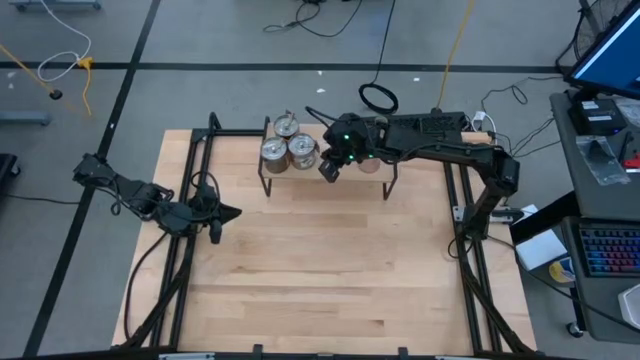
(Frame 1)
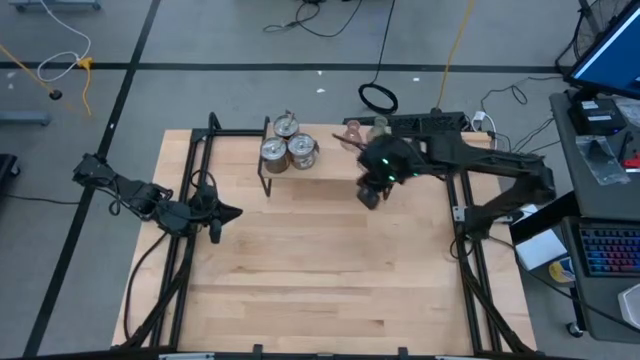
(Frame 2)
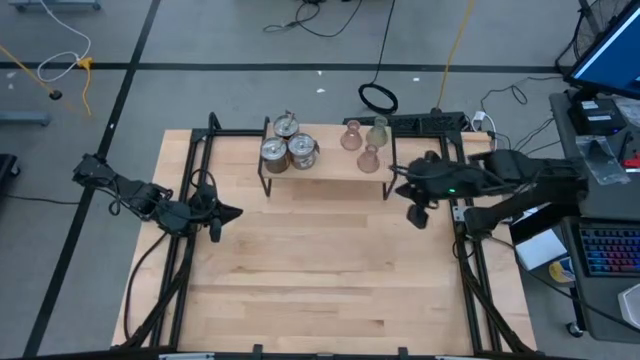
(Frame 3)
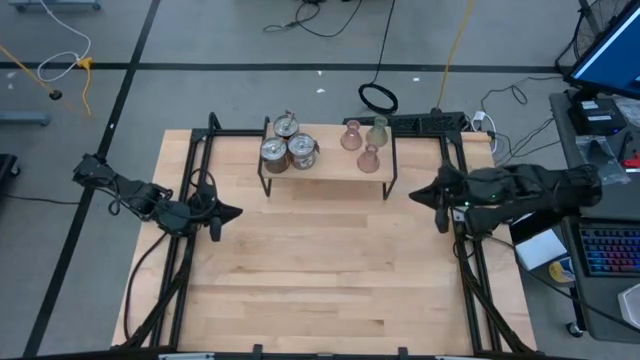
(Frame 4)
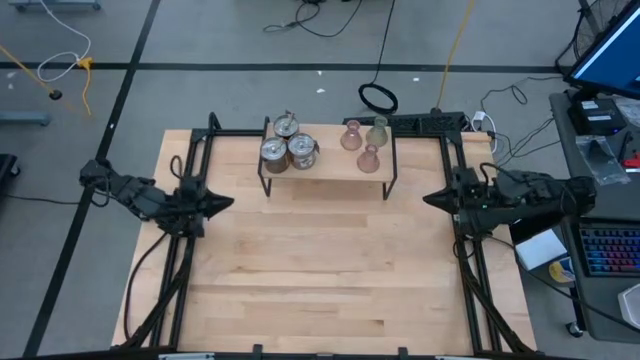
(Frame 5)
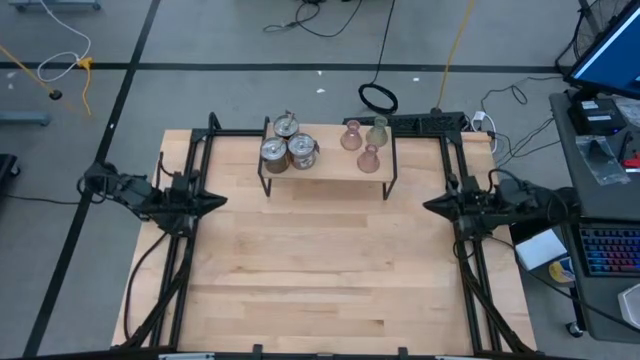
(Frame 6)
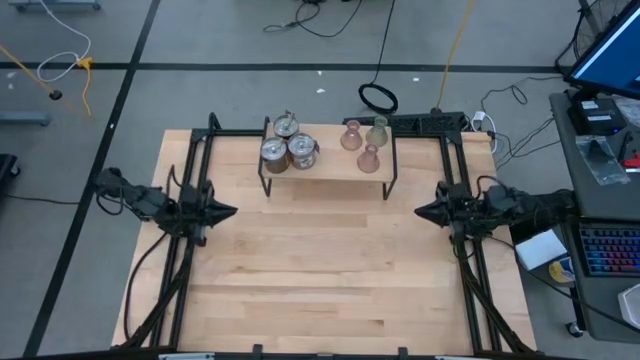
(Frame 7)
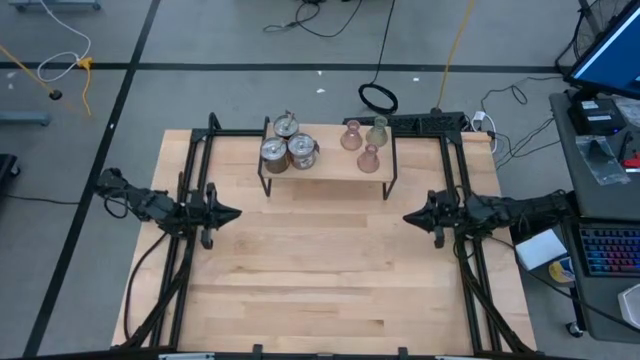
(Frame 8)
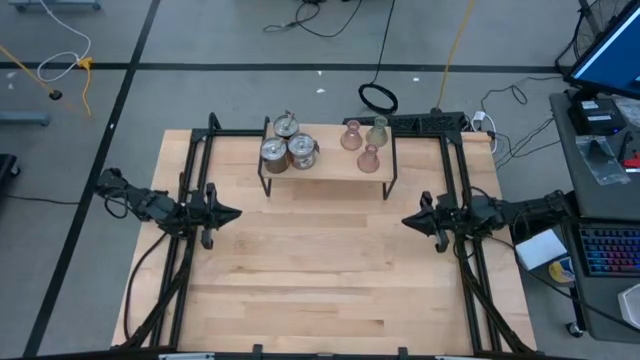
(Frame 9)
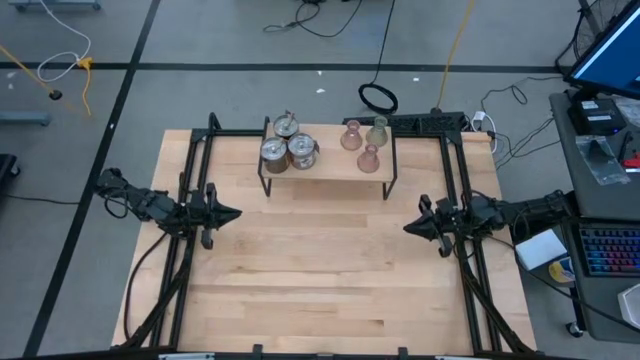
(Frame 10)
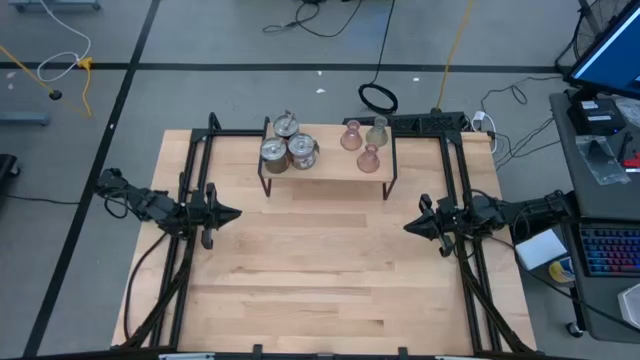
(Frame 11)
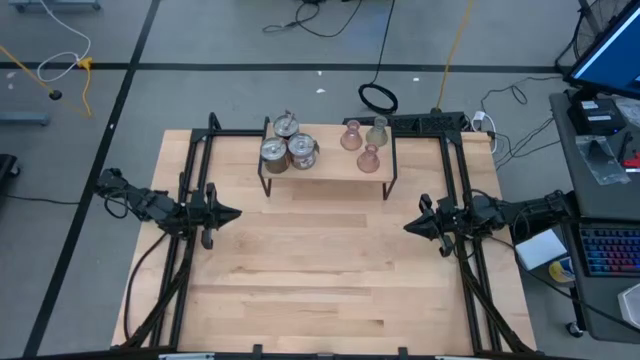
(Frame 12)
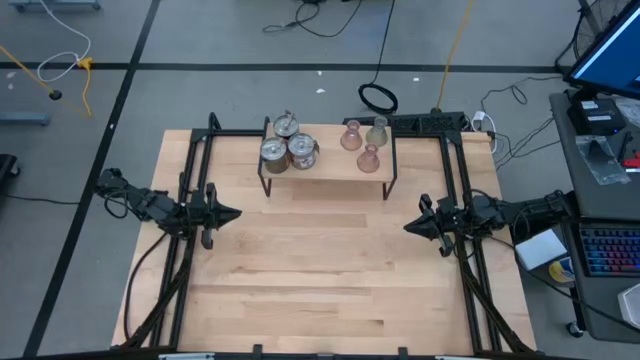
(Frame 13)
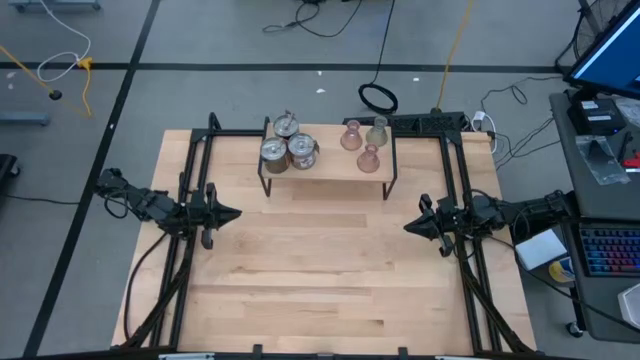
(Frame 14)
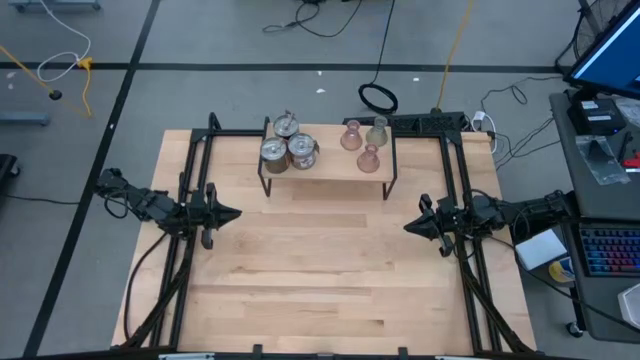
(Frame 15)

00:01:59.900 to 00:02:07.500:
Task: Pick & Place candle stick holders
Return to Home Position

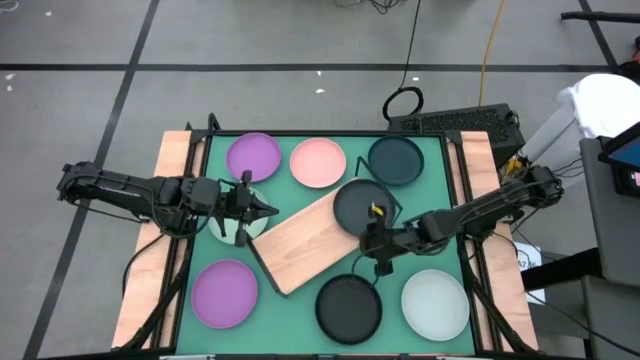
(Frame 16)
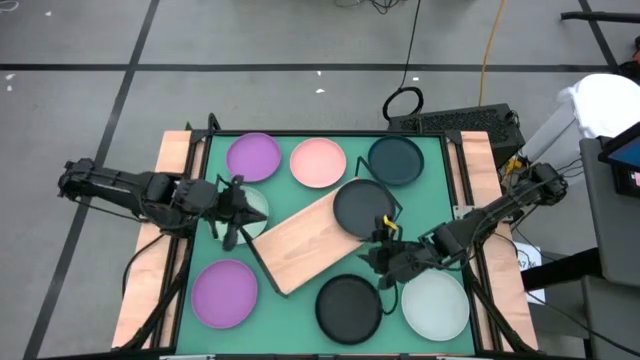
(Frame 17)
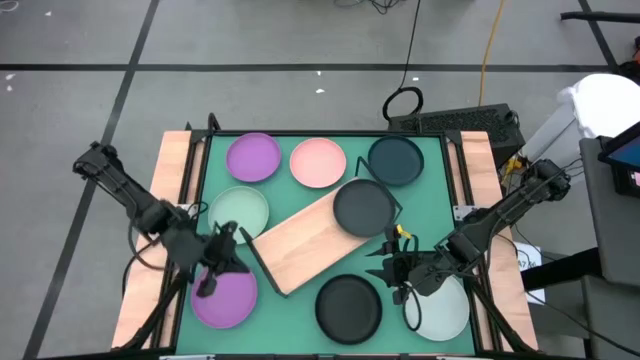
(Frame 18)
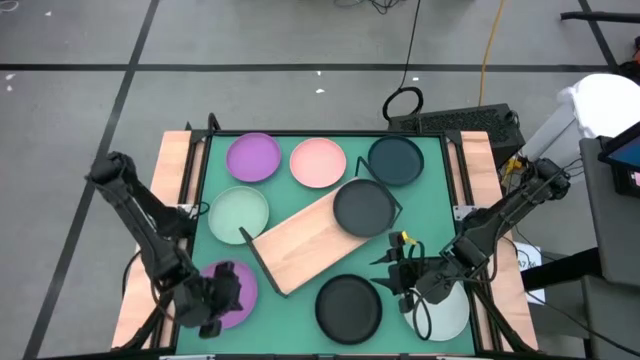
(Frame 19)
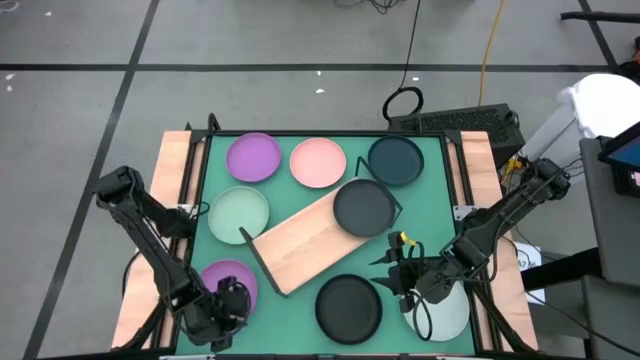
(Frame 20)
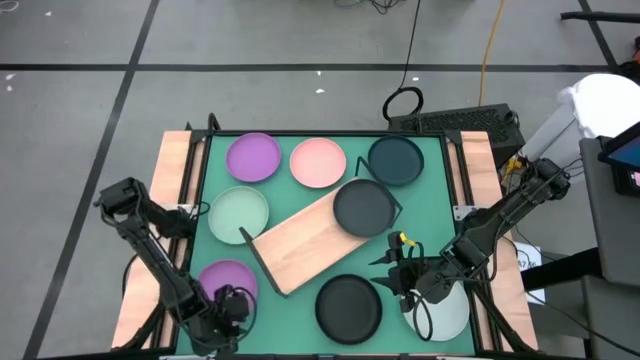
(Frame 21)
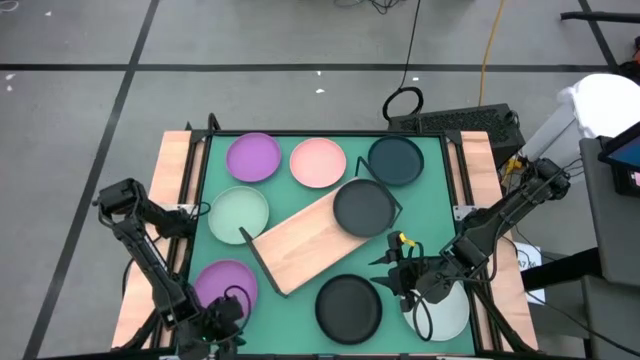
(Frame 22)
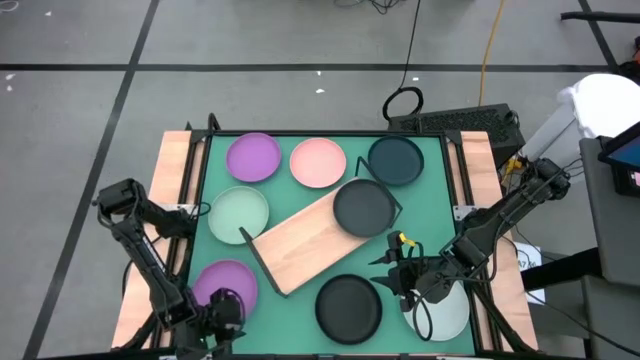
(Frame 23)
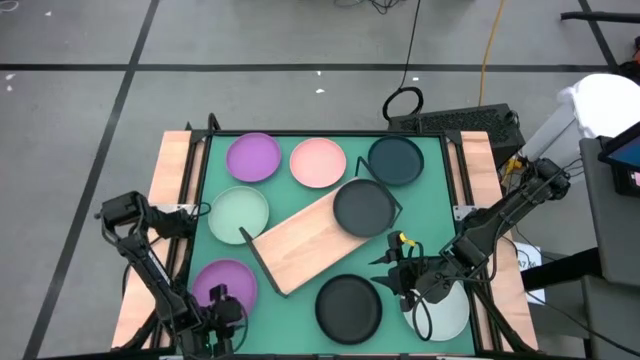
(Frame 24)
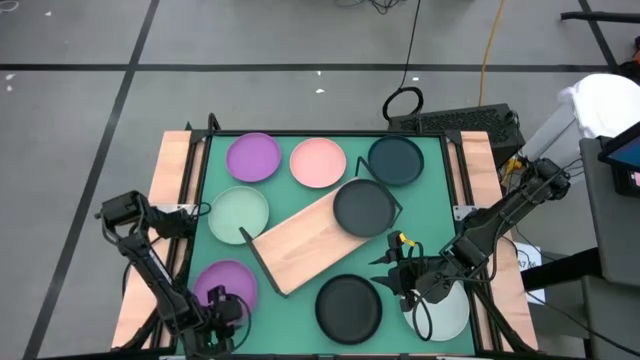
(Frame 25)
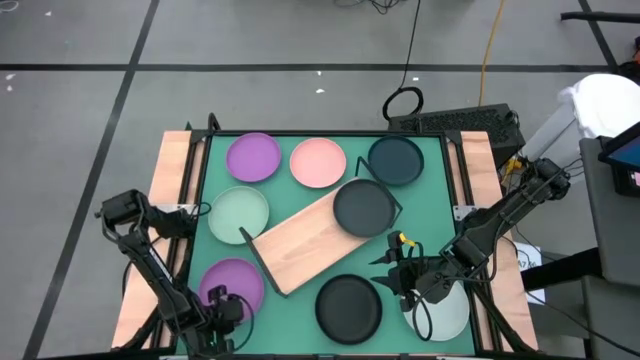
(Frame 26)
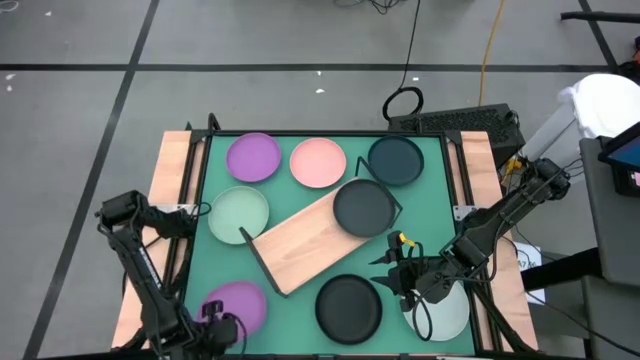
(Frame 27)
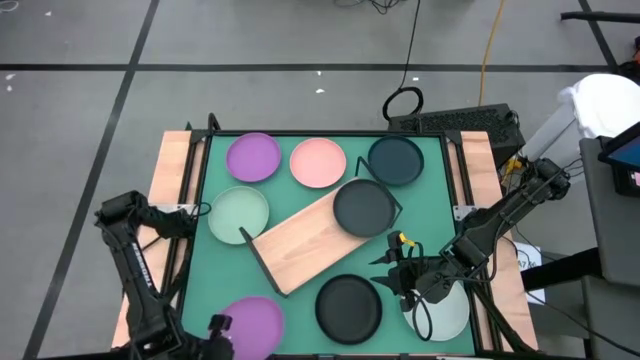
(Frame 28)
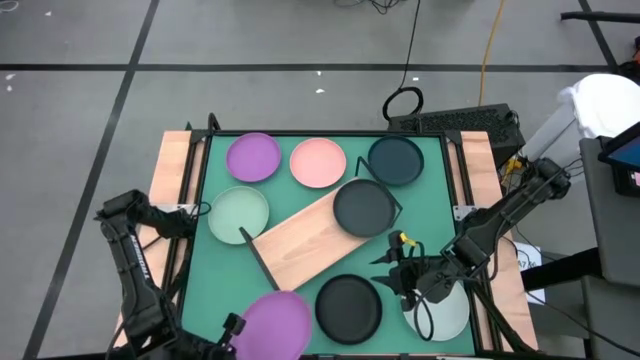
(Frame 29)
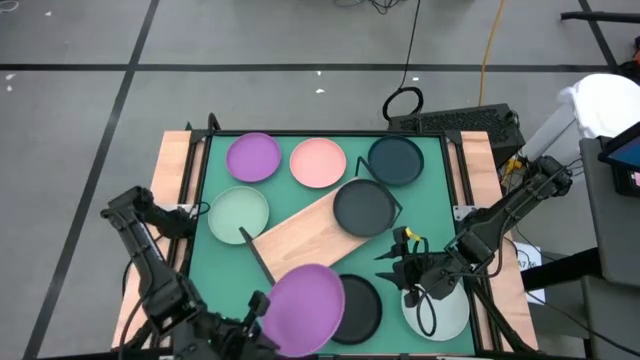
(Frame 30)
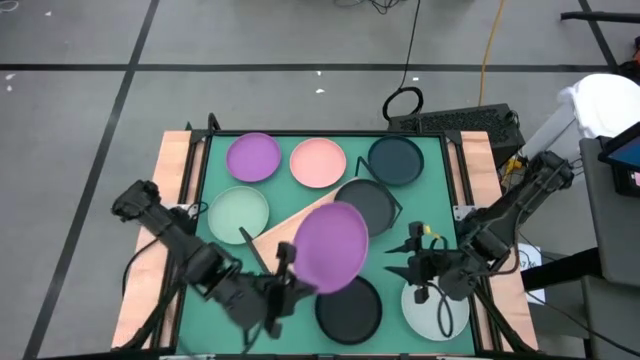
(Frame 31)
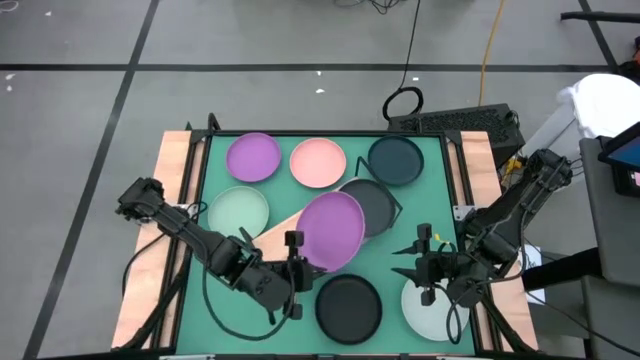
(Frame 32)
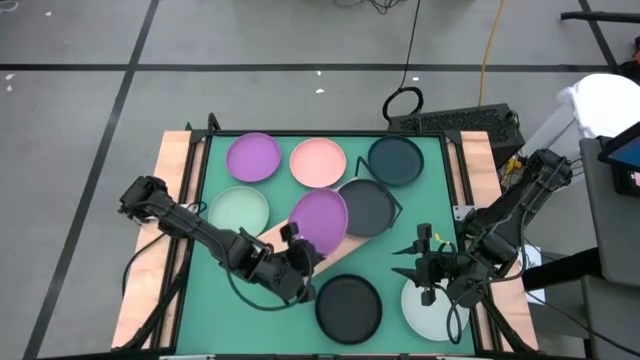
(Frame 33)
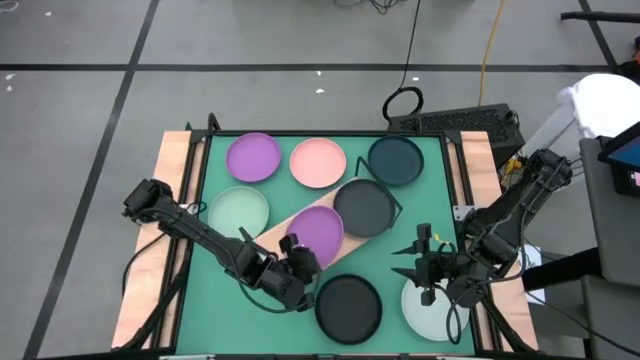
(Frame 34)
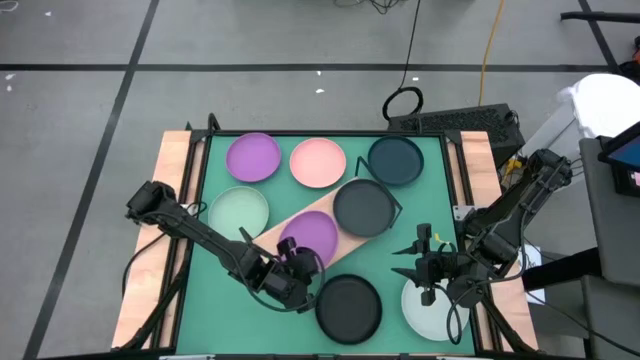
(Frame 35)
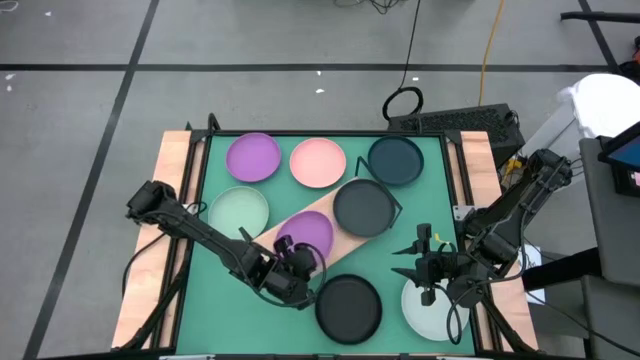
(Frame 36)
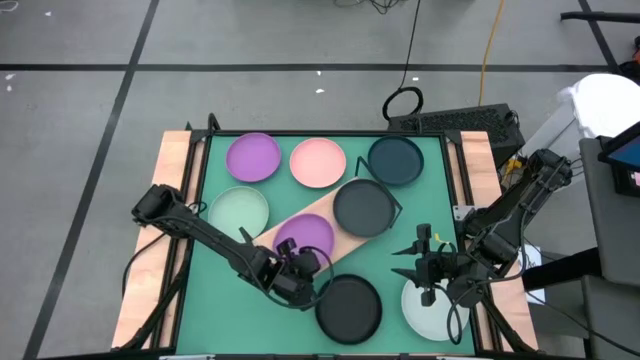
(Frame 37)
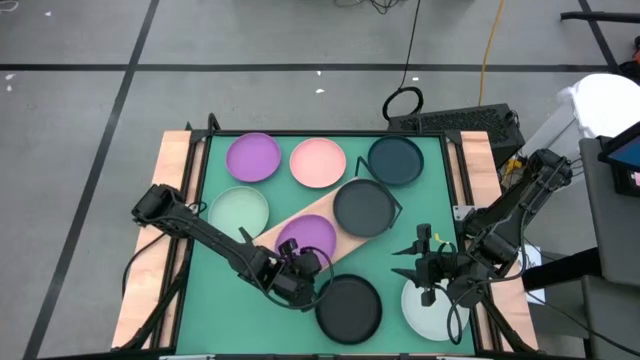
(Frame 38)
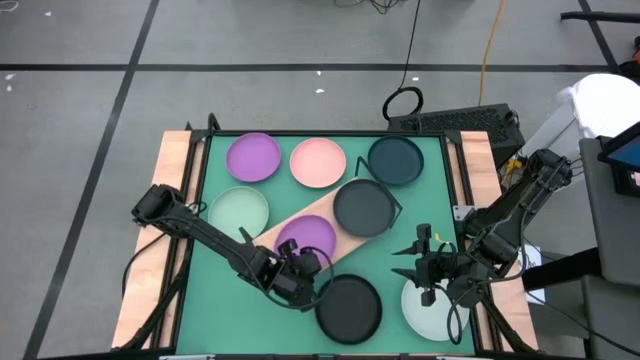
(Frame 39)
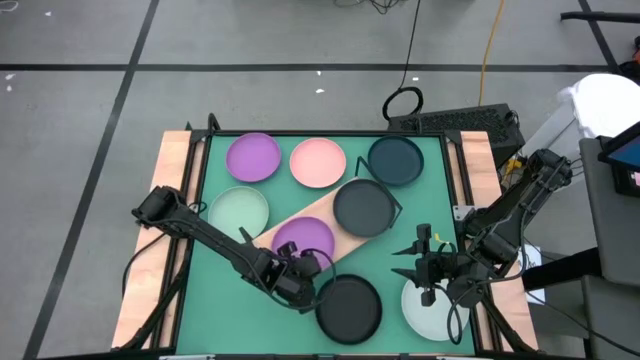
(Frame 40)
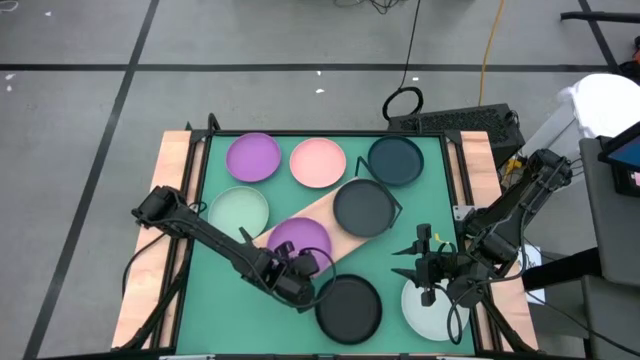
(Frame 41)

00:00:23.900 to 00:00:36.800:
Task: Place and stack plates onto a shelf
Put the bottom violet plate on the shelf
